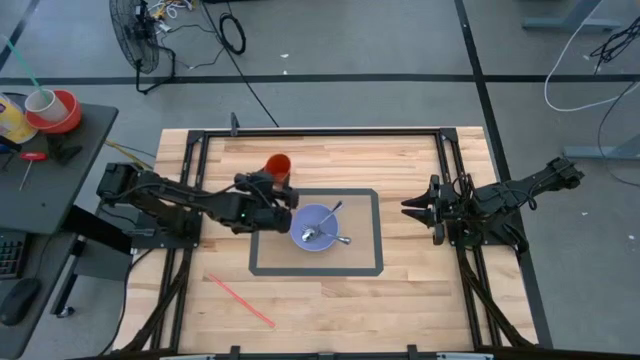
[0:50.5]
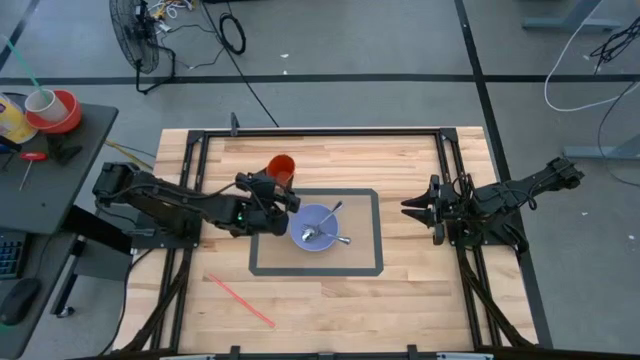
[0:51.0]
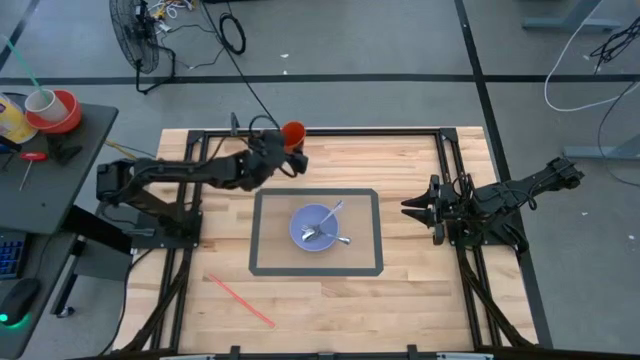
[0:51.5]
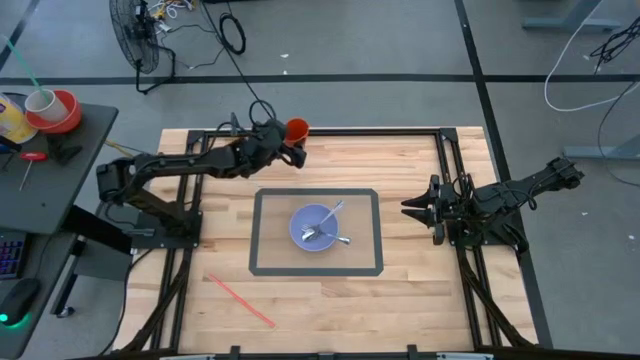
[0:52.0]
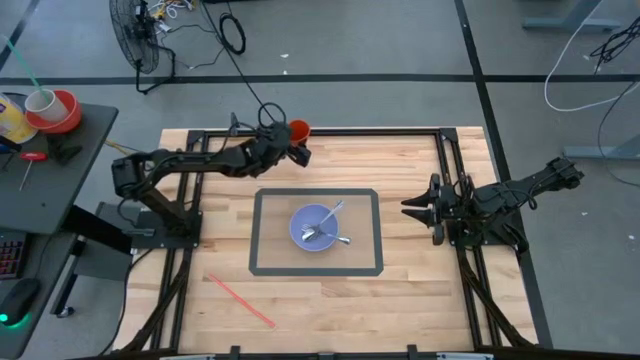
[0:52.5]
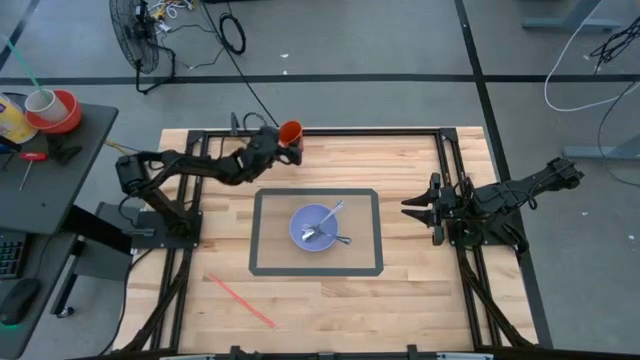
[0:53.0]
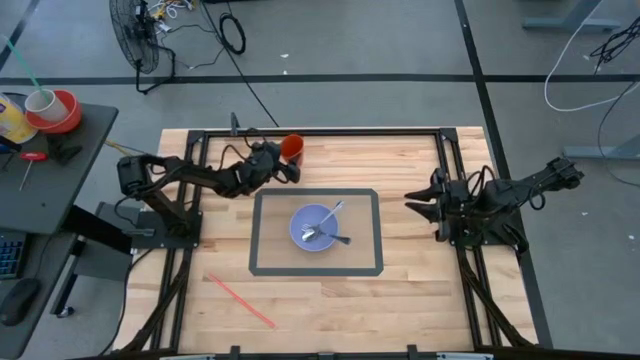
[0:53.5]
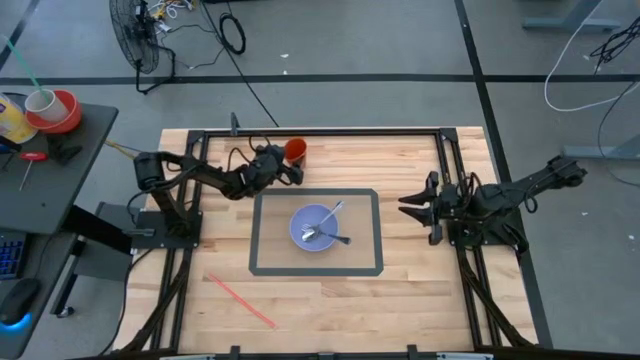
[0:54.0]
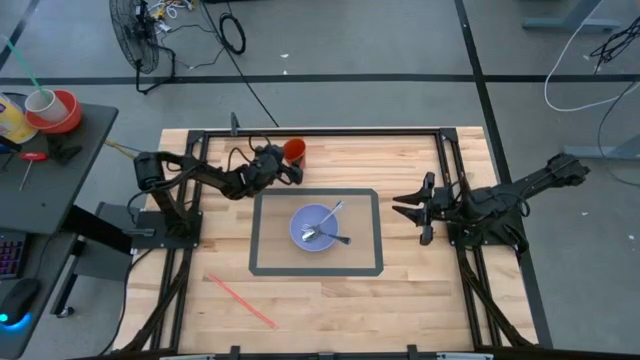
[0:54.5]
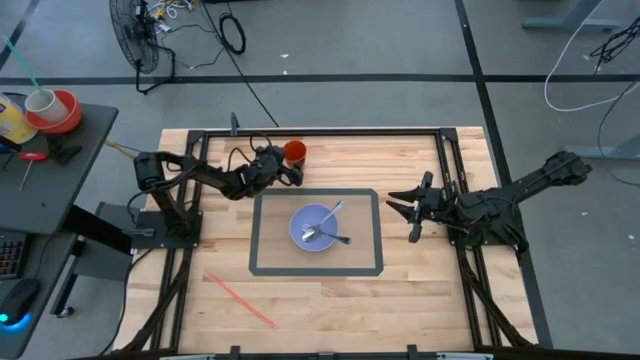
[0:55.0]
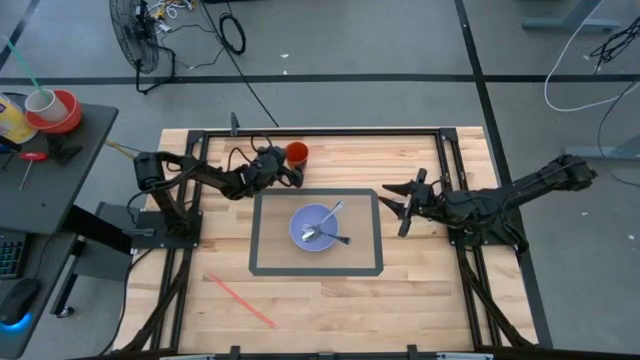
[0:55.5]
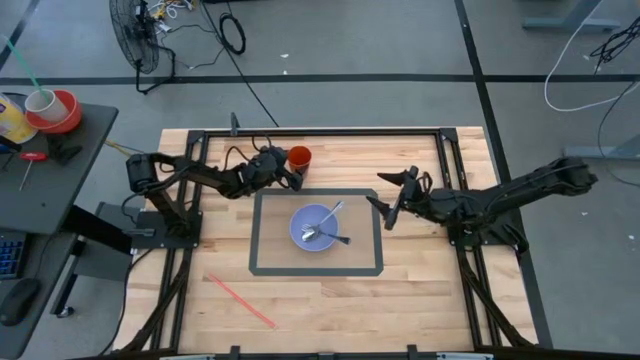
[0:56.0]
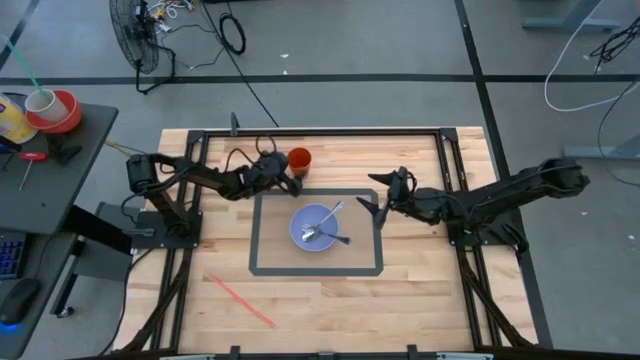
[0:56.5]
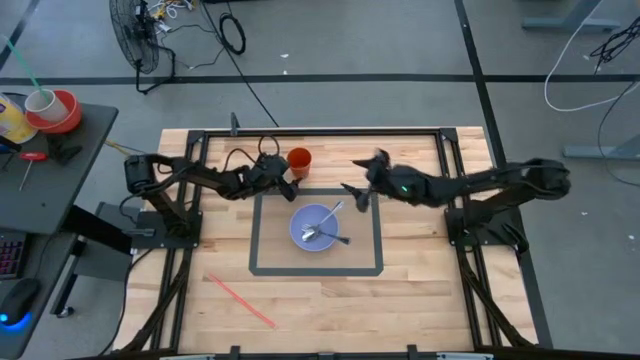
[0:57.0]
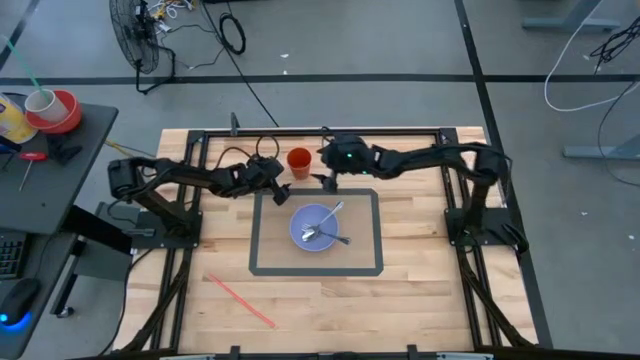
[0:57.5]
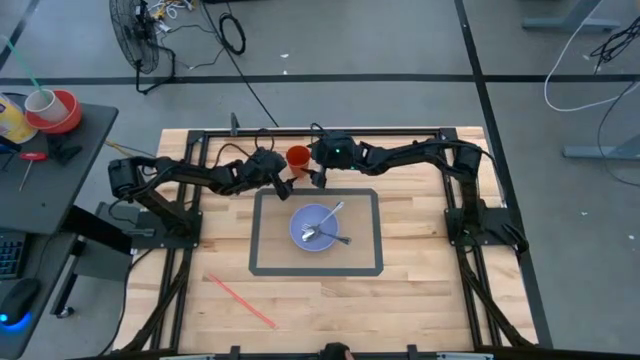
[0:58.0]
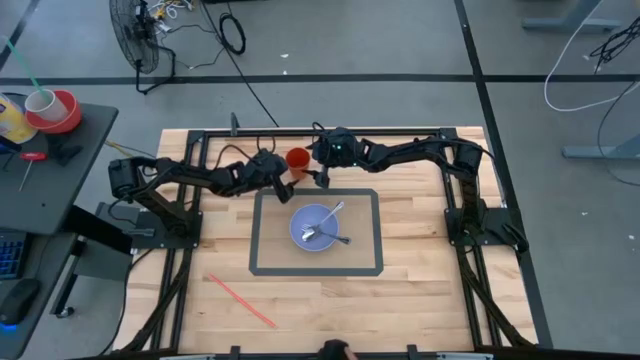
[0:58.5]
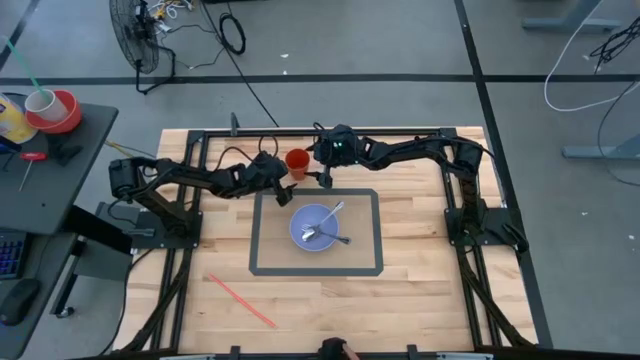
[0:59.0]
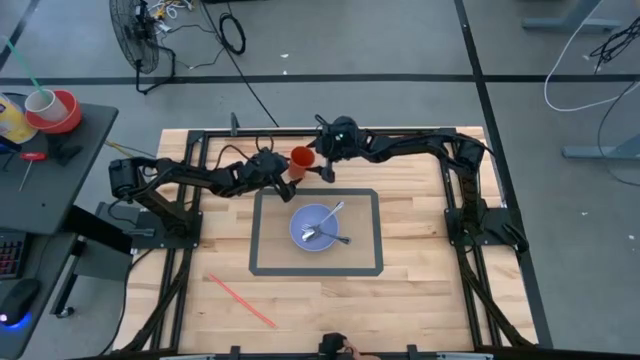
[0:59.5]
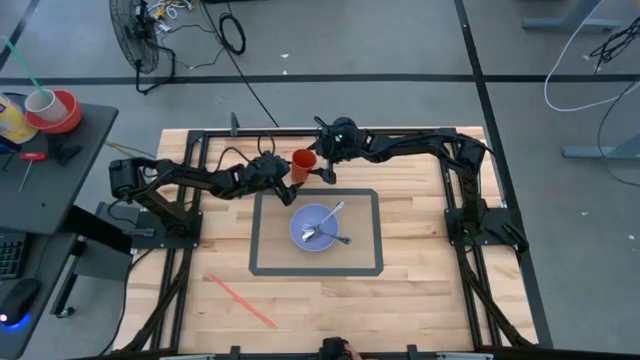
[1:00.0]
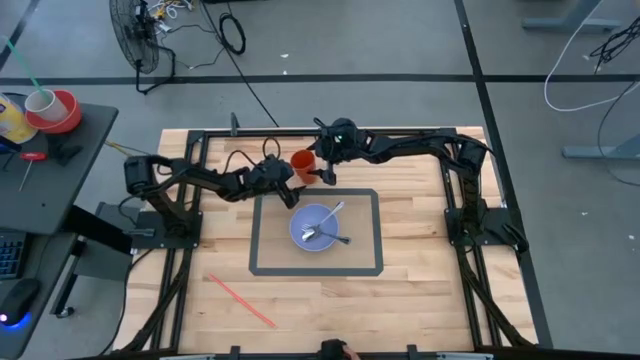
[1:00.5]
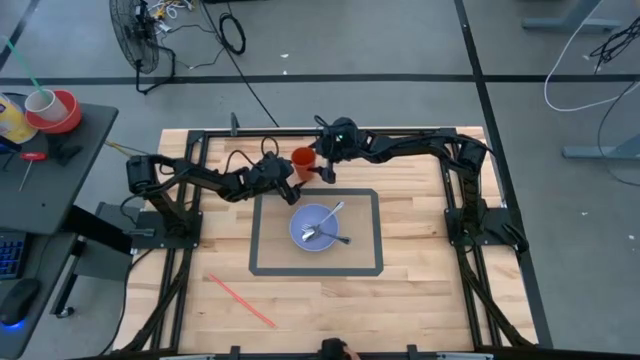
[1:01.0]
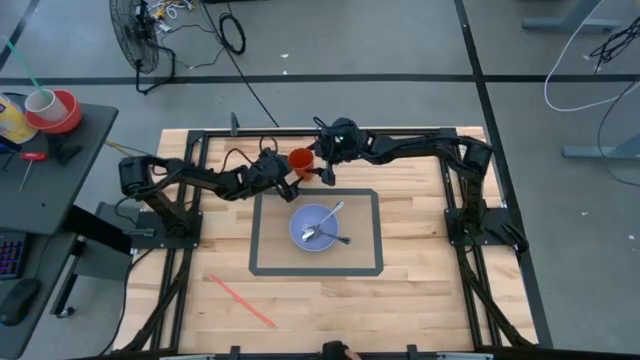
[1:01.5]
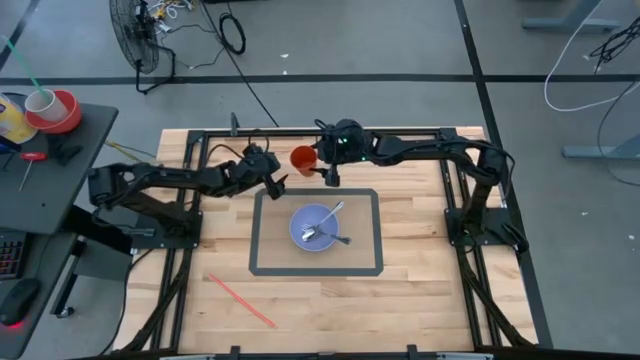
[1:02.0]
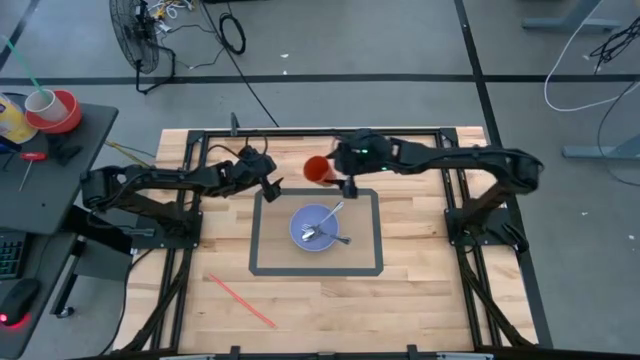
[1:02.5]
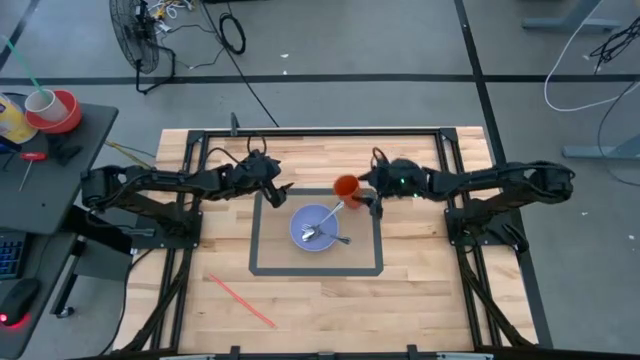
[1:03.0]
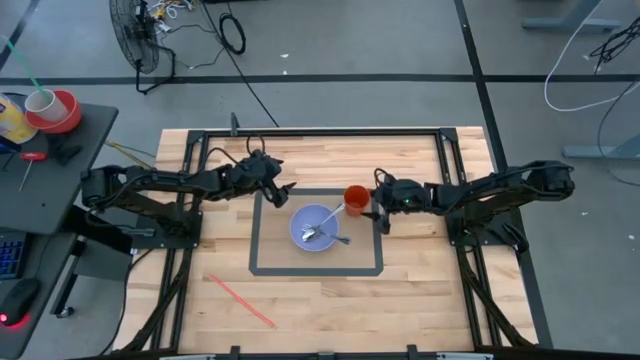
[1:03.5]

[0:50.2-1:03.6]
Task: Pick & Place Utensil
Put the orange cup on the mat to the top right of the purple bowl

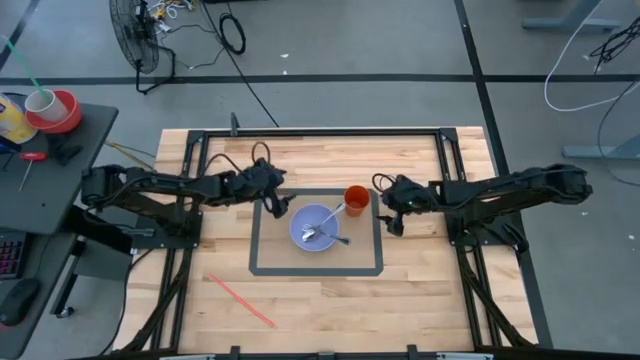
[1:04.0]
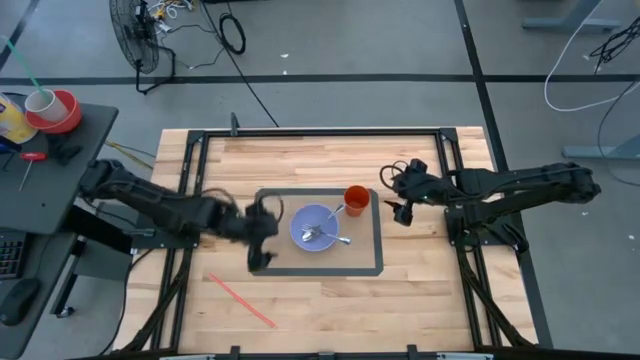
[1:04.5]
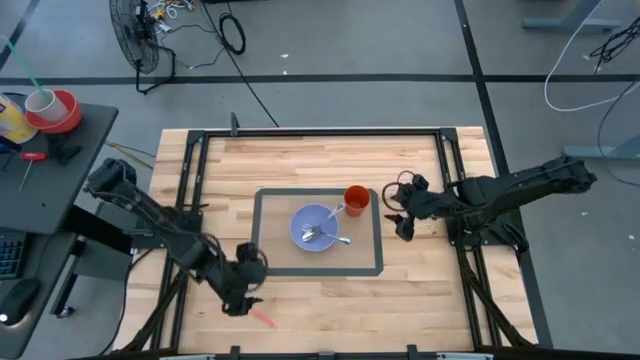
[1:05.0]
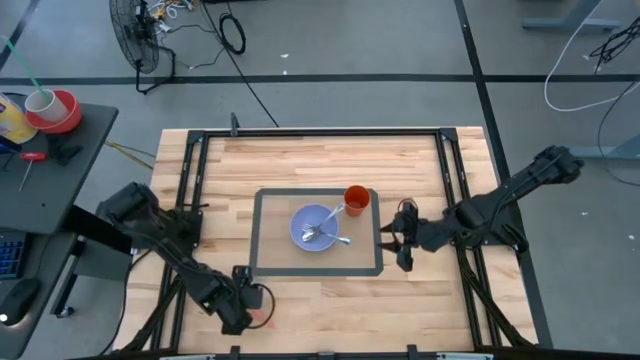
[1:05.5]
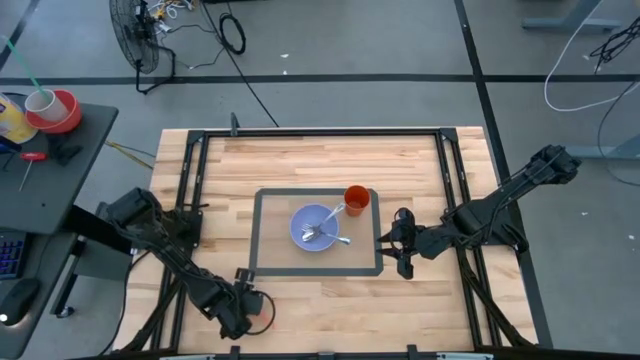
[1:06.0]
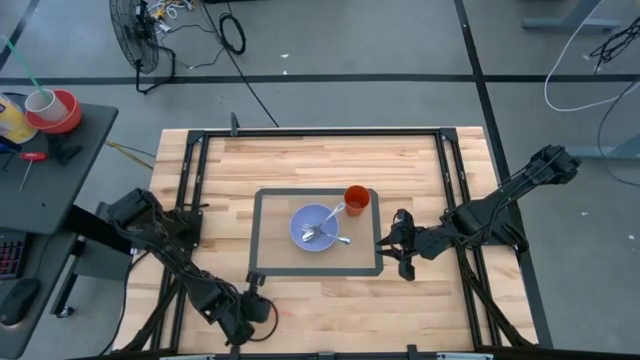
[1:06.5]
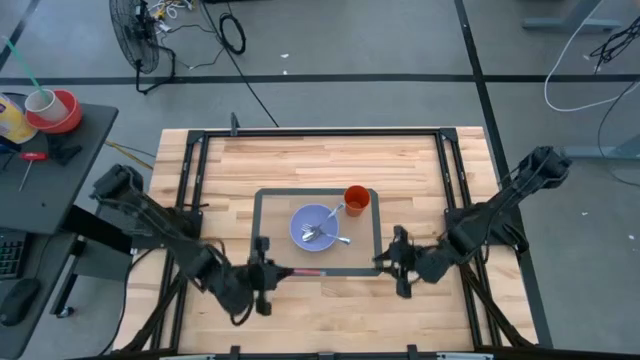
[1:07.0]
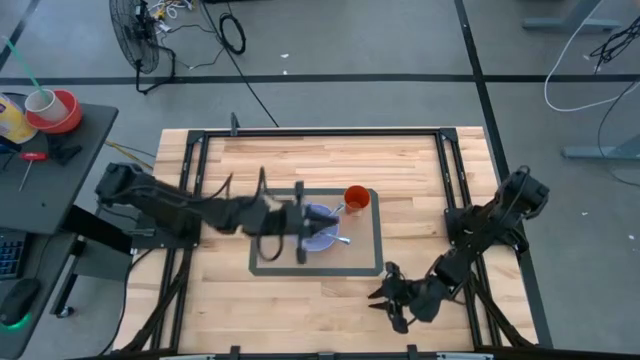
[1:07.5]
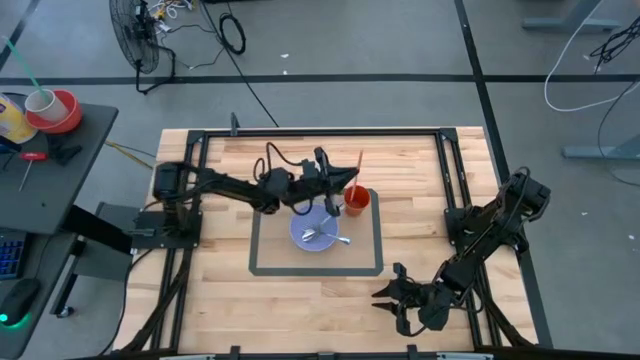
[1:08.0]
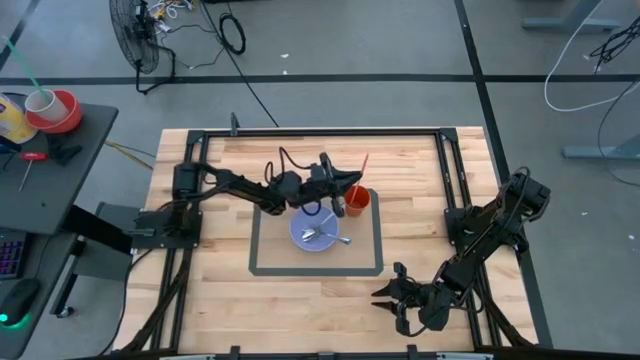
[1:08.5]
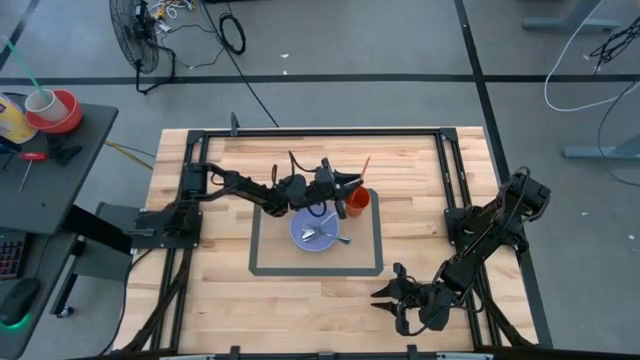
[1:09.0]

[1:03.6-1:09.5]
Put the orange straw into the orange cup

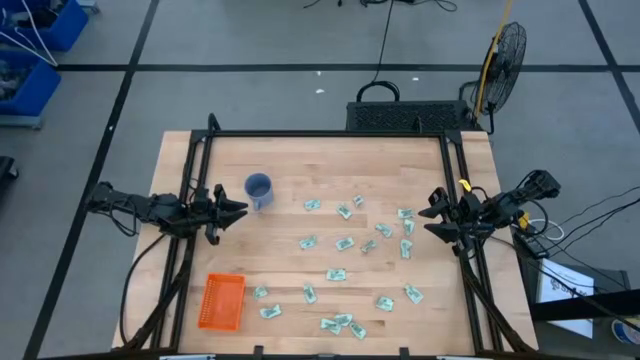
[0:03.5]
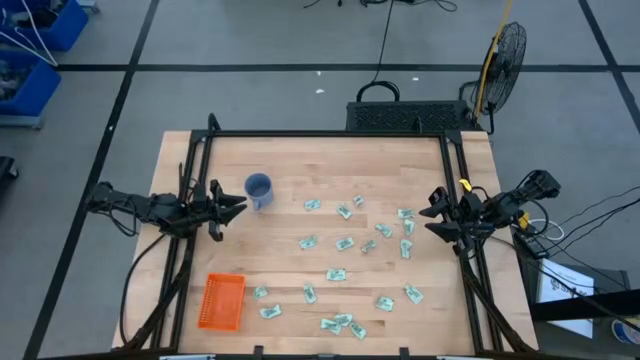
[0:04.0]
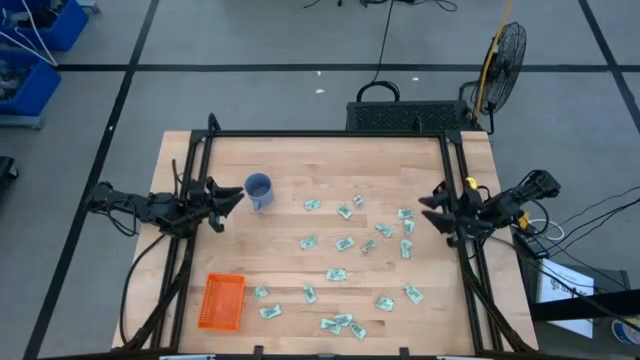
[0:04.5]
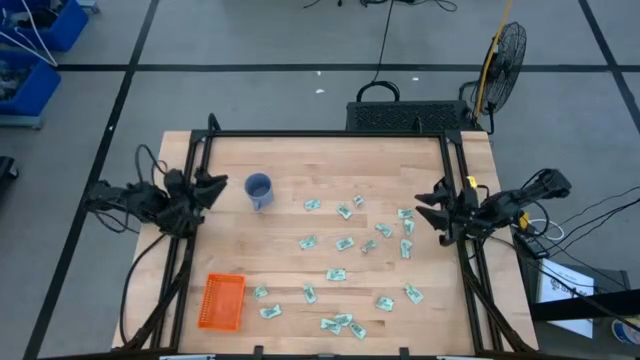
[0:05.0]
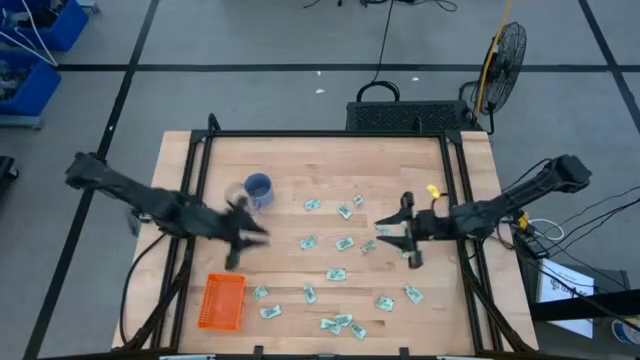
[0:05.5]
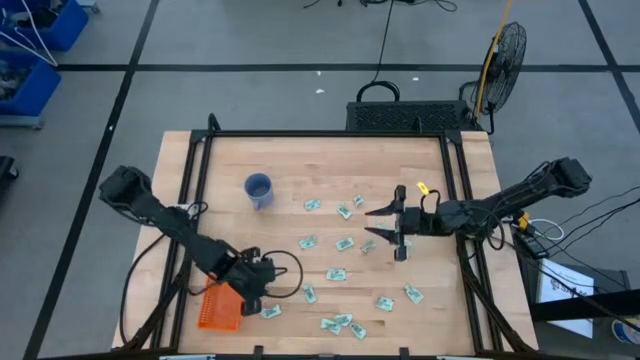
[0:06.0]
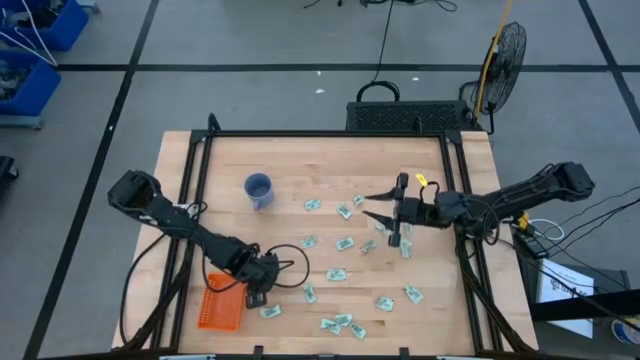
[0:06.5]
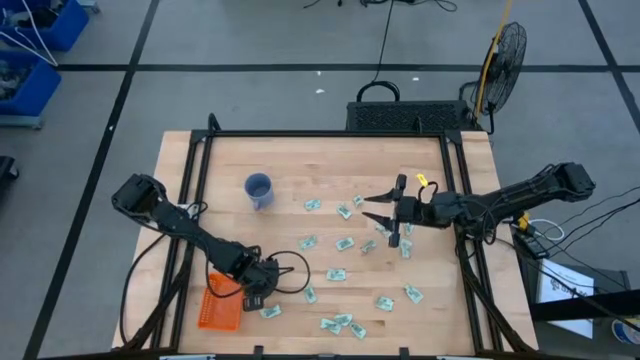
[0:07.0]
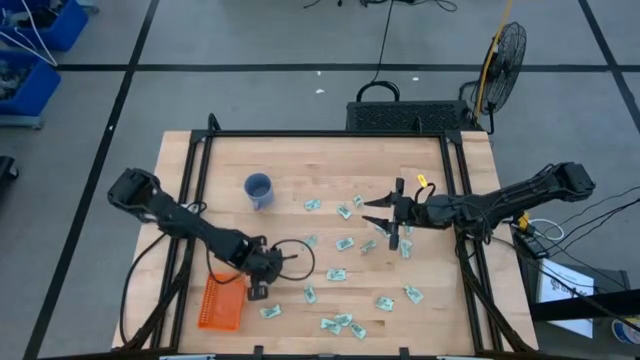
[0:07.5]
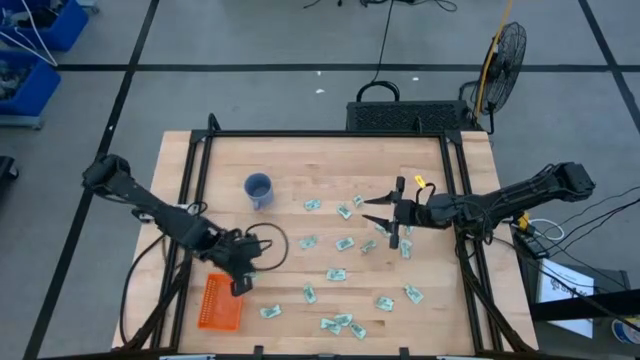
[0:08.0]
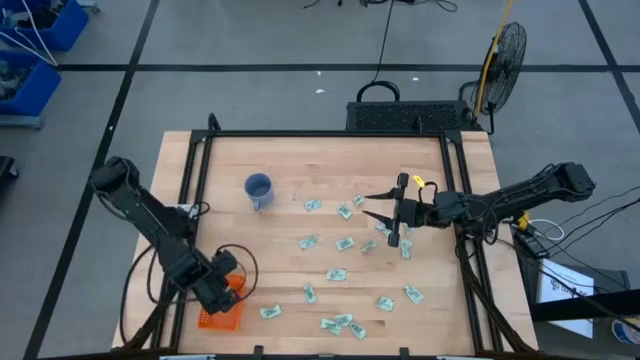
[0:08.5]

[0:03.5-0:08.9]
Task: Pick and place Stevia / Truvia into bins
Put the stevia packet into the orange bin
